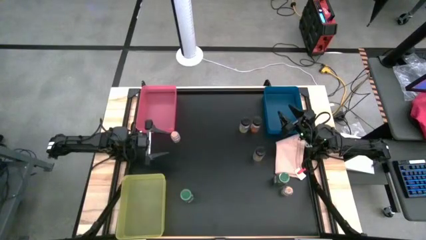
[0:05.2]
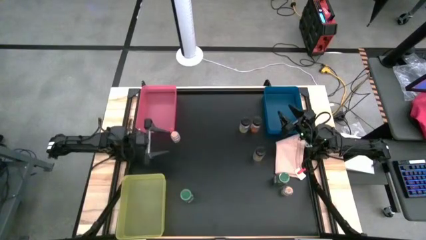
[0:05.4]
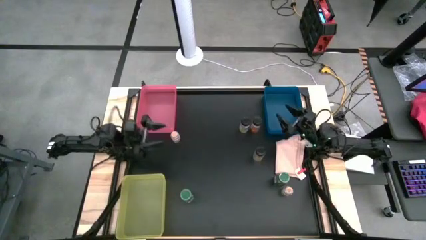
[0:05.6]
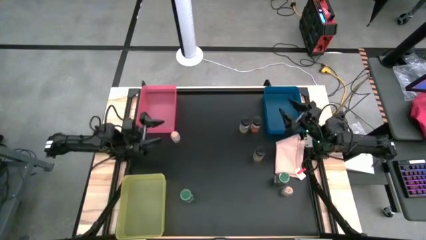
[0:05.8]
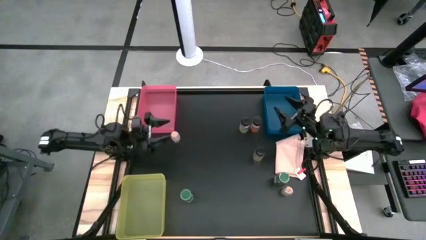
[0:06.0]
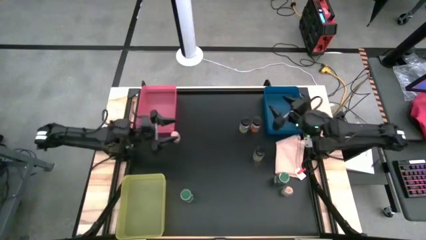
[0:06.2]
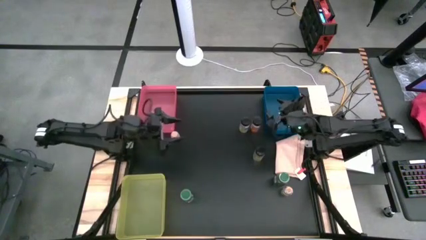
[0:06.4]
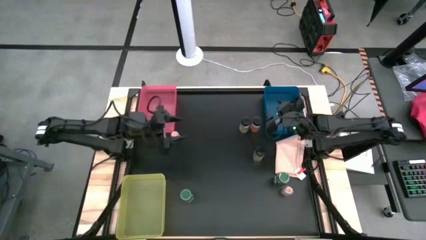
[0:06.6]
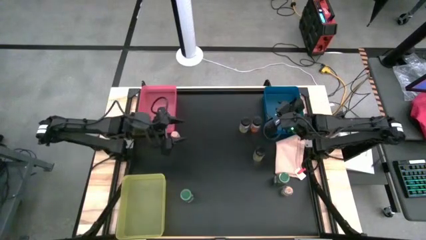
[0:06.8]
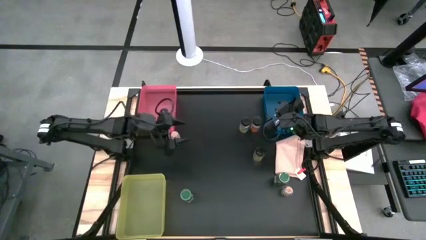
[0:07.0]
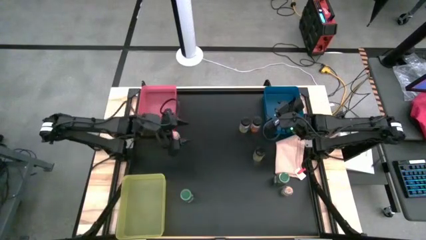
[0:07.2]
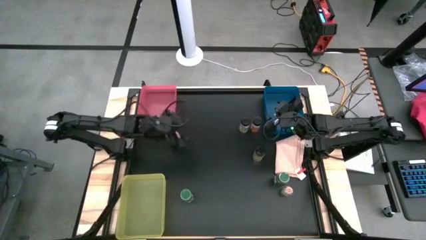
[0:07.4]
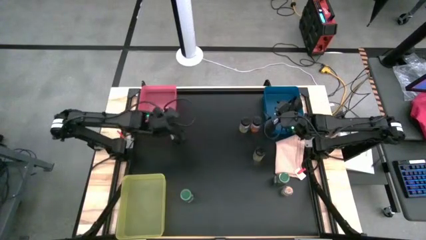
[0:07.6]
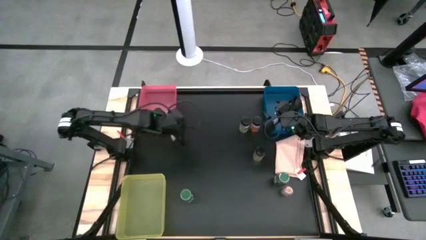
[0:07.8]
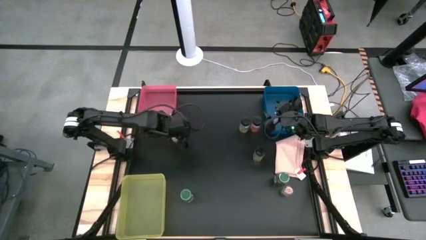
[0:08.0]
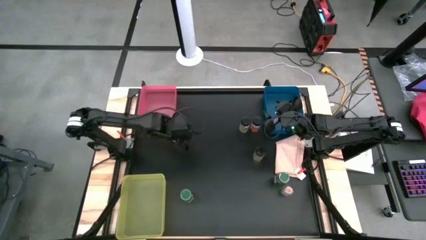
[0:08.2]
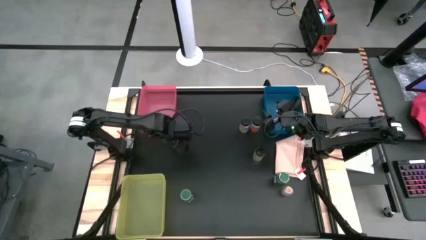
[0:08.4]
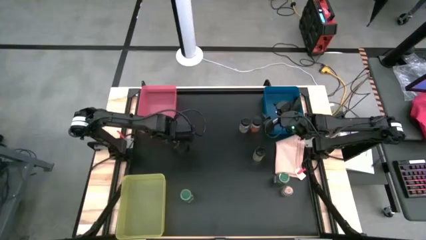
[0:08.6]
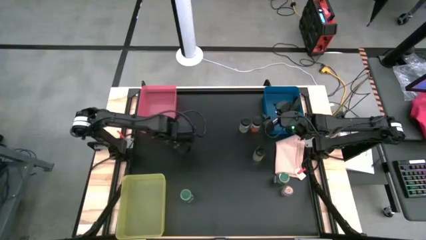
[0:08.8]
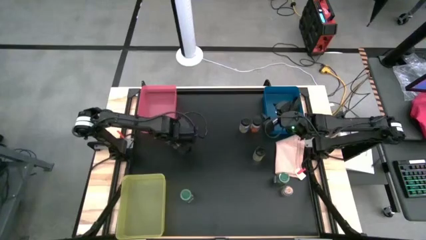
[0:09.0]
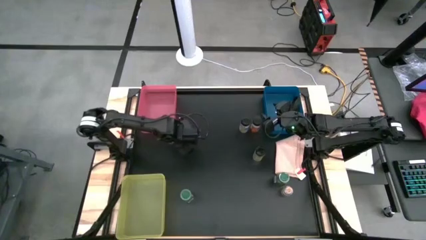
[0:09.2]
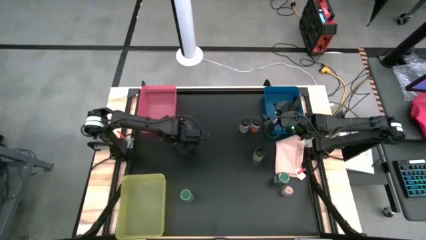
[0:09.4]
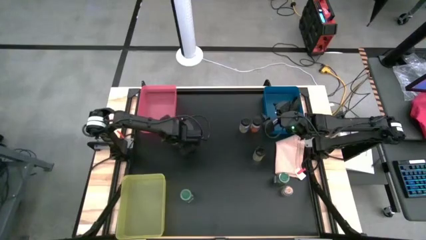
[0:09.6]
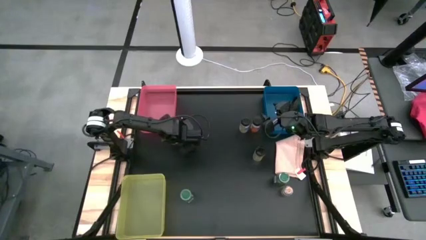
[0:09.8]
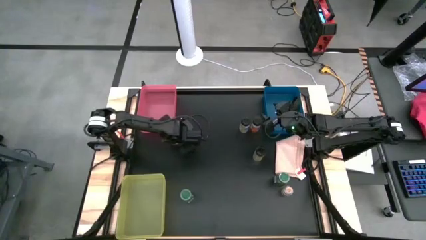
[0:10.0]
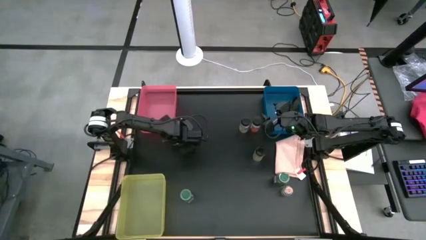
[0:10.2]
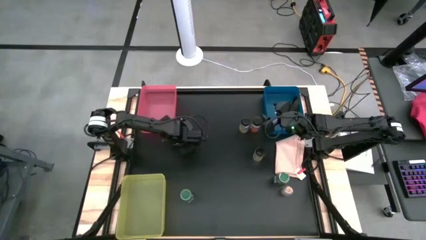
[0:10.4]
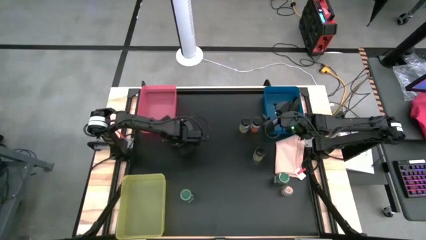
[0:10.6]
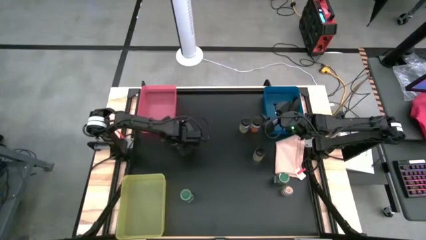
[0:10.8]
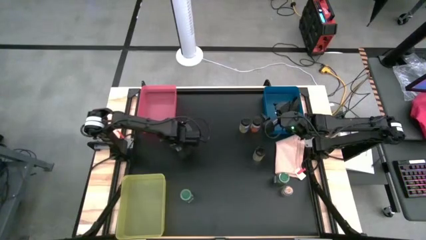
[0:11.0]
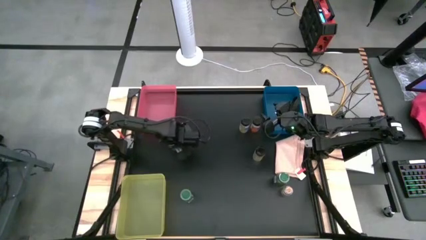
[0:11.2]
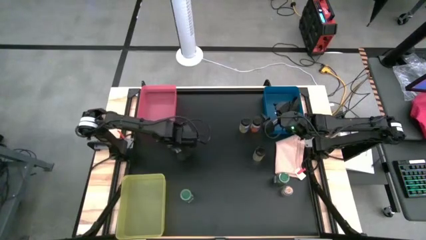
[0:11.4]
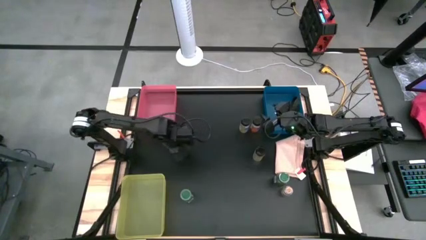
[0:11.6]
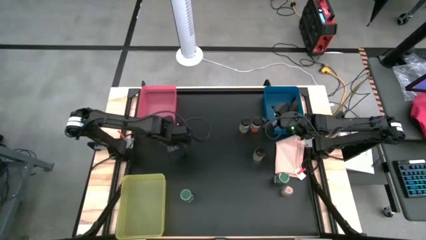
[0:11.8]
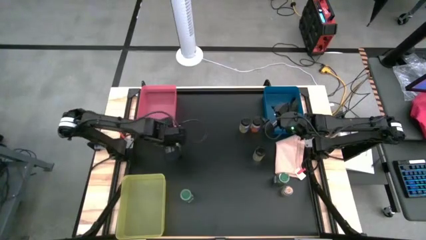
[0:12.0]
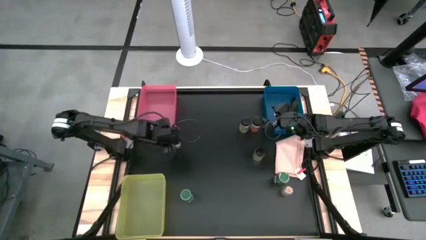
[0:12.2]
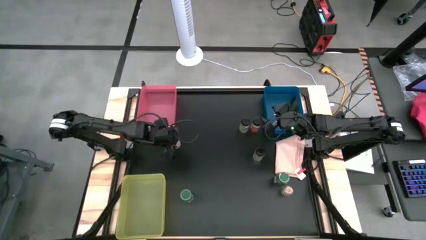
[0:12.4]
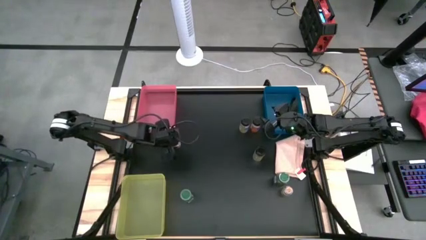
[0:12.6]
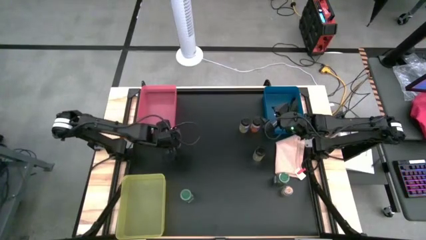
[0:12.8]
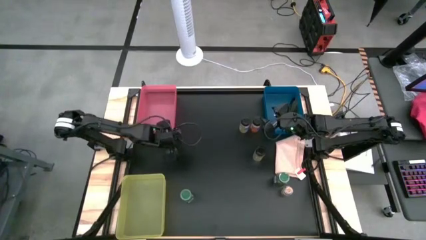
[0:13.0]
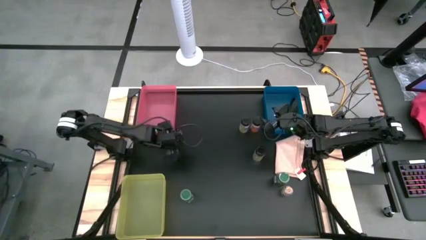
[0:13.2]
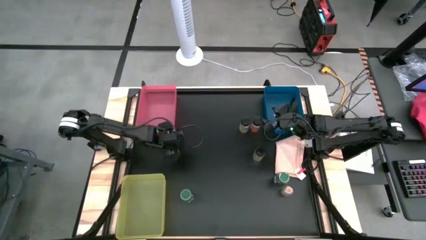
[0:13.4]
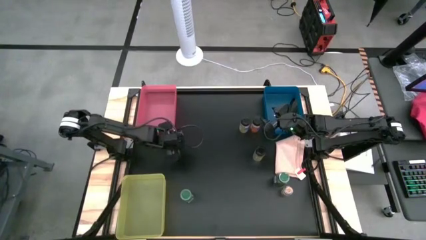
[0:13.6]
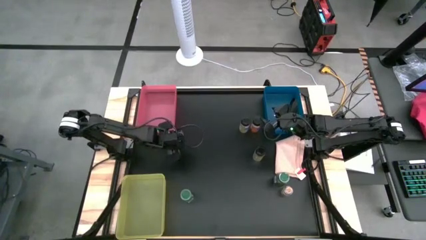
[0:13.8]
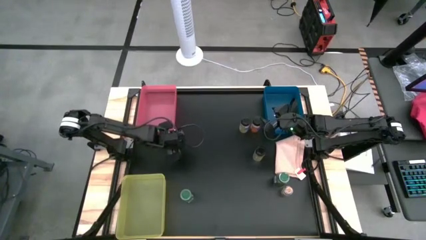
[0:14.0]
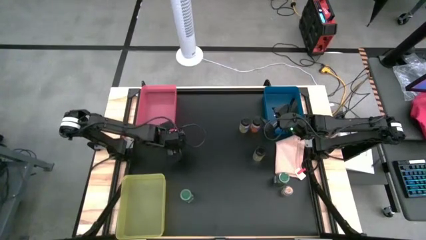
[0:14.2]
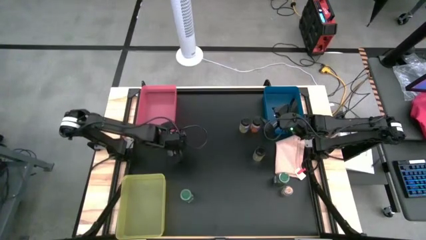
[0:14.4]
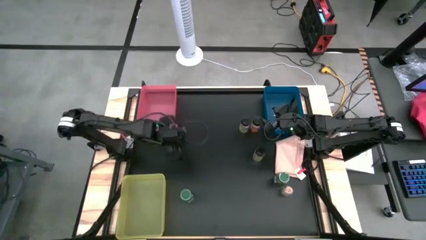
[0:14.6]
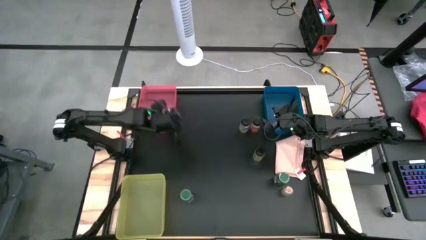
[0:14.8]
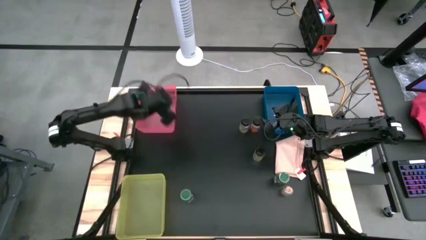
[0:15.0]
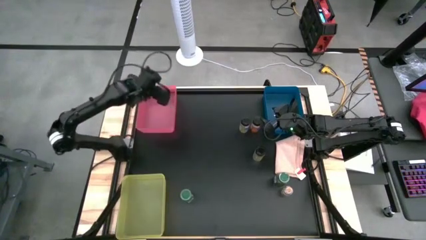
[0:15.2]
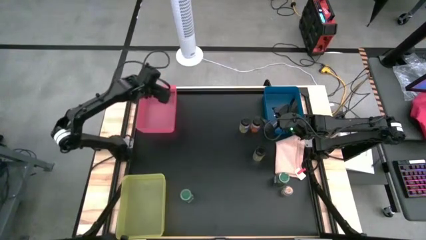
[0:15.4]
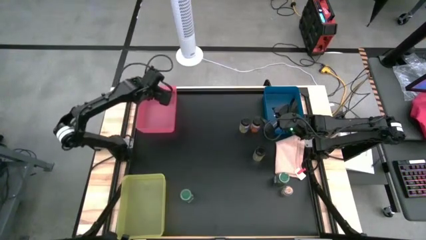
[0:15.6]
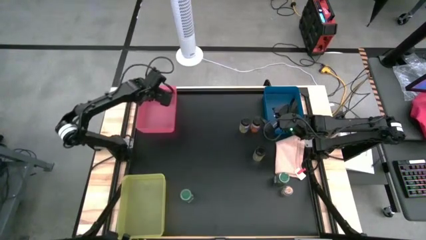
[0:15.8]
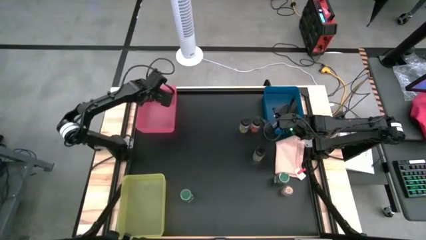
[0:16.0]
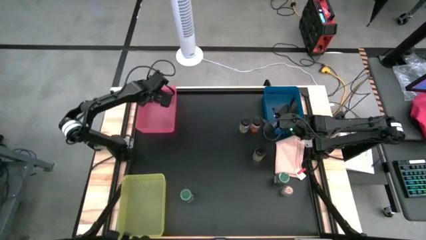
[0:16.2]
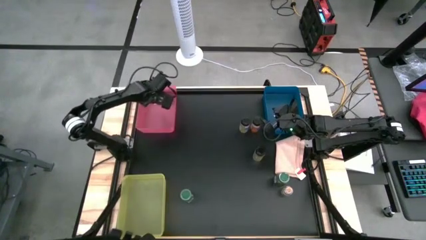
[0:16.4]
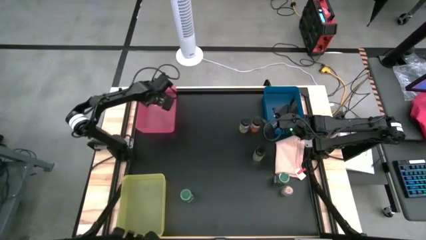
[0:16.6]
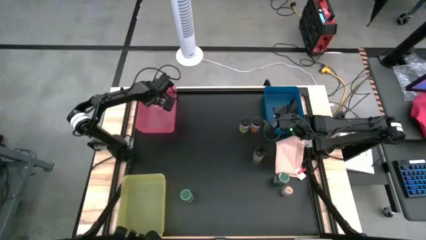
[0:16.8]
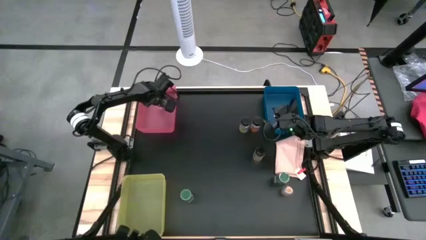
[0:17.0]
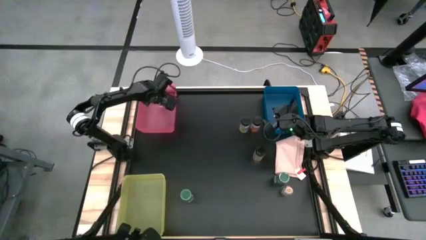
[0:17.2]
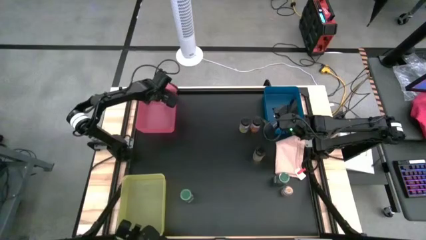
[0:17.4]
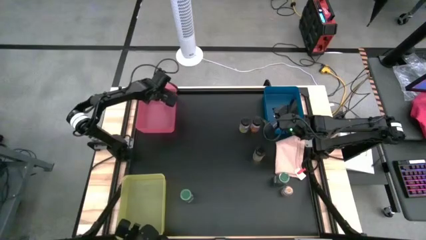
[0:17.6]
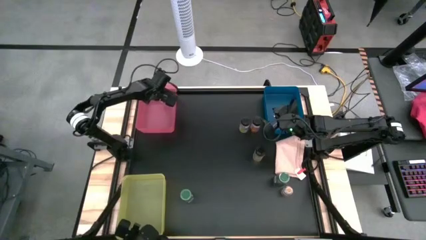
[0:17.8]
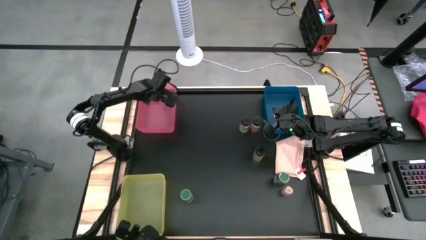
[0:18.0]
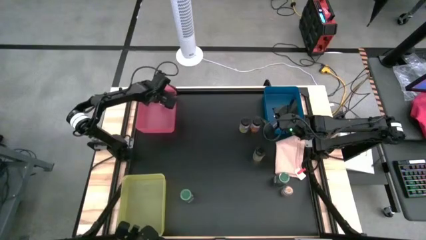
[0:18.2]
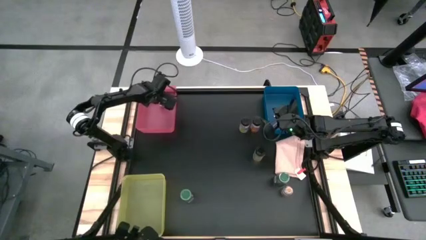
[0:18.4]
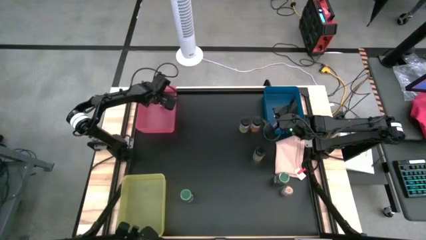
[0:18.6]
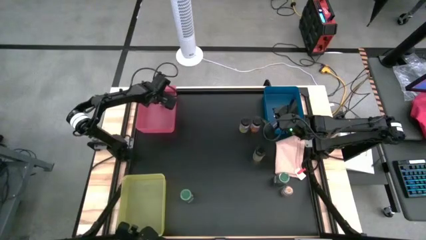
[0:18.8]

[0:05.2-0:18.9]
Task: Sort spices by type
Put the top brown seasoning into the pink bin
